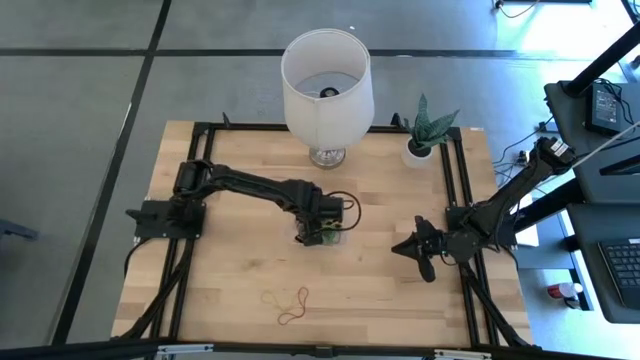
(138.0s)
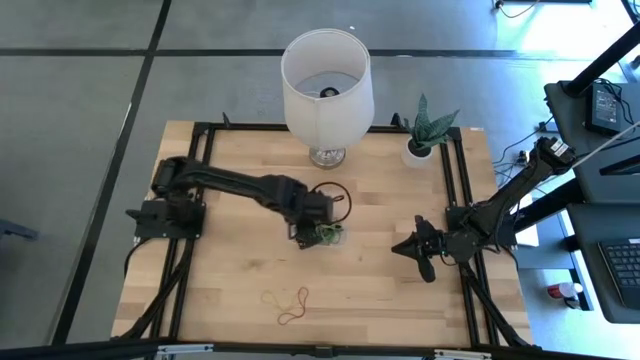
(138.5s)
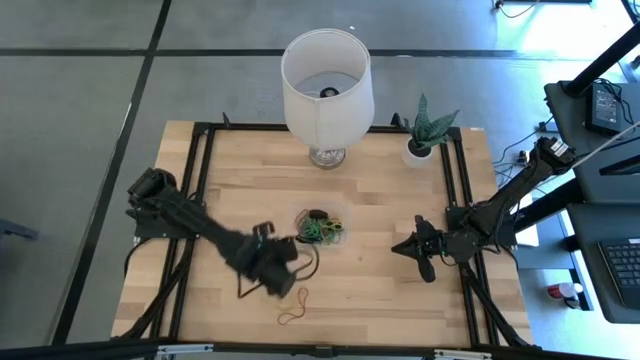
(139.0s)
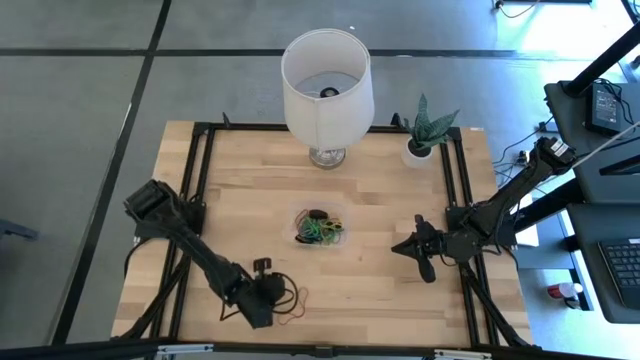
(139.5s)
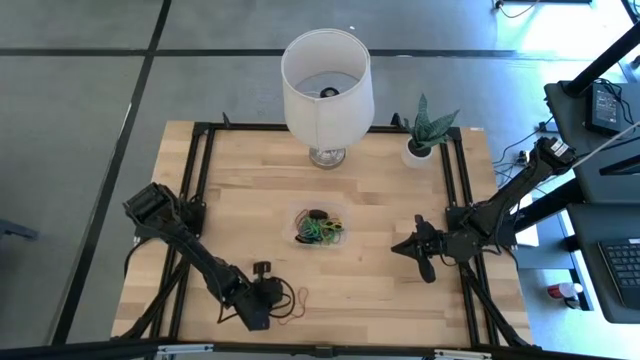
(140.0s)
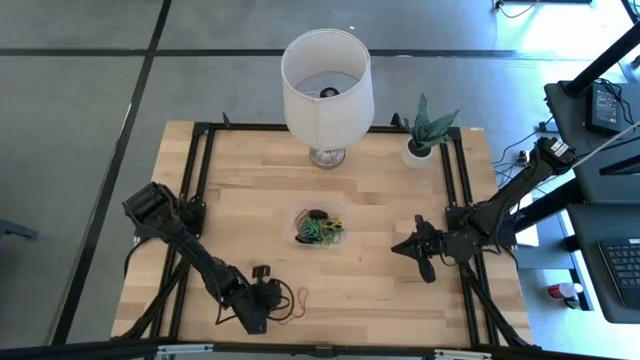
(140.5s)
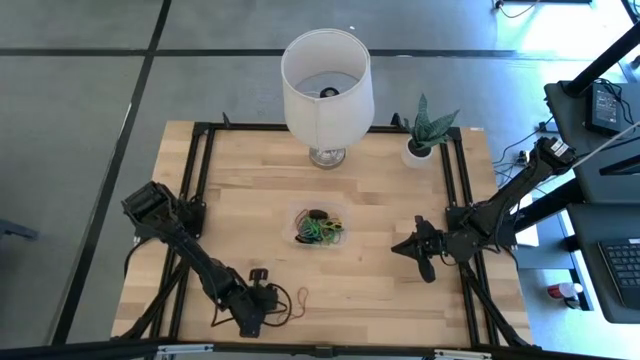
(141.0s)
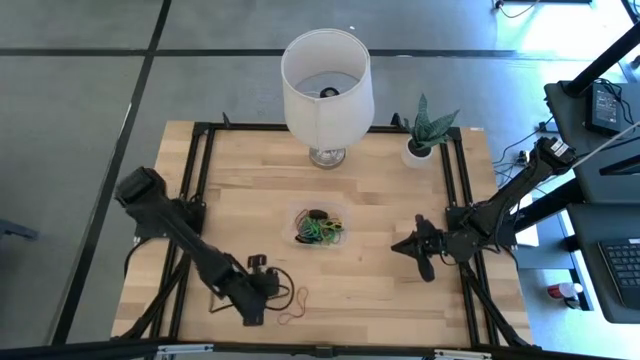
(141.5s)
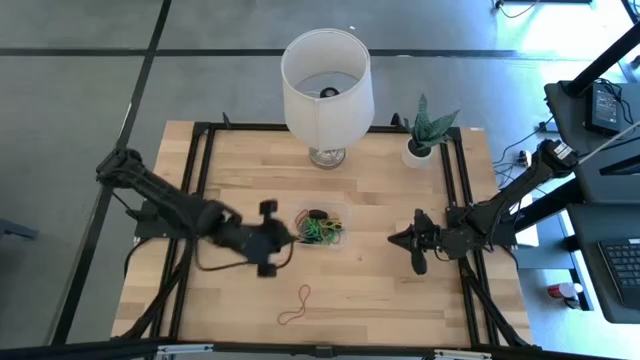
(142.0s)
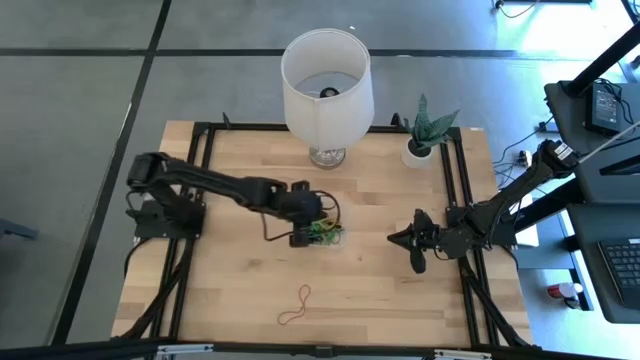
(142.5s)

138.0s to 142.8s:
Task: Pick and place rubber bands into bin
Put the yellow rubber band into the container

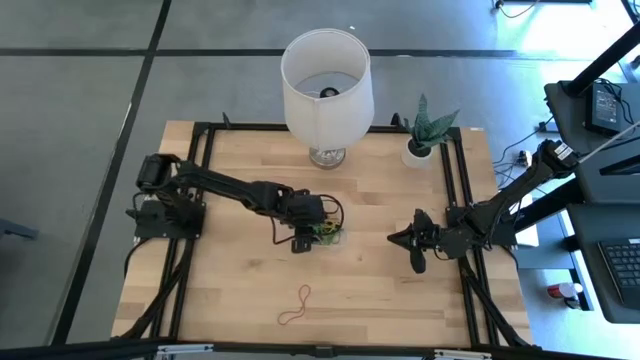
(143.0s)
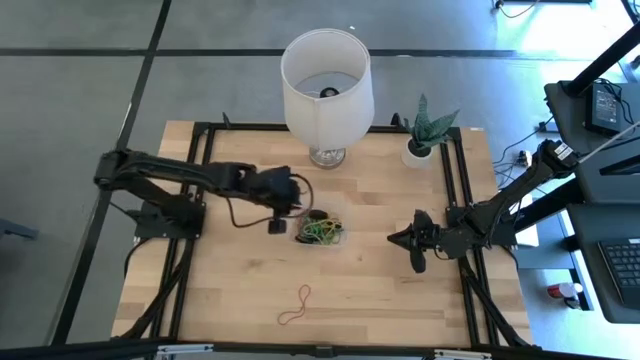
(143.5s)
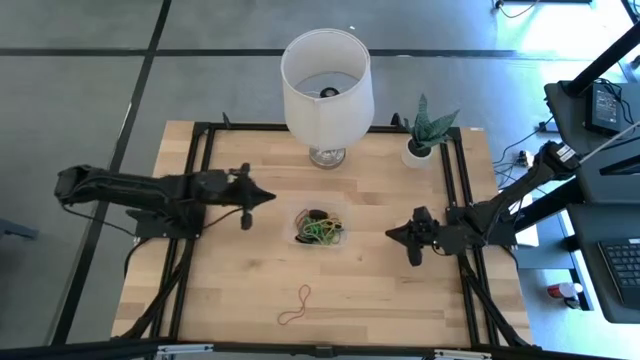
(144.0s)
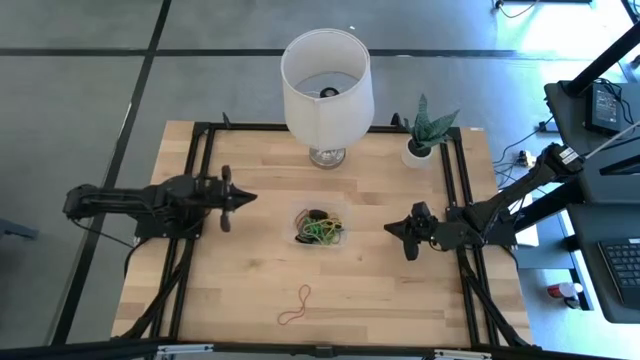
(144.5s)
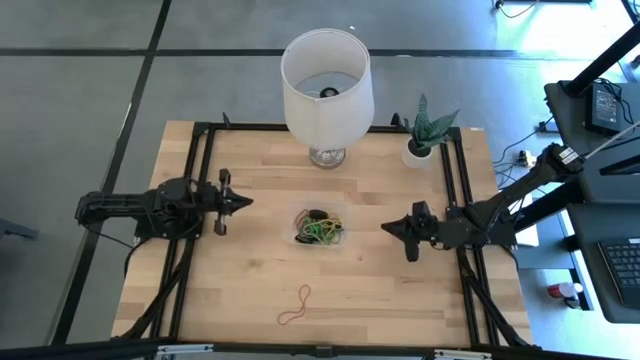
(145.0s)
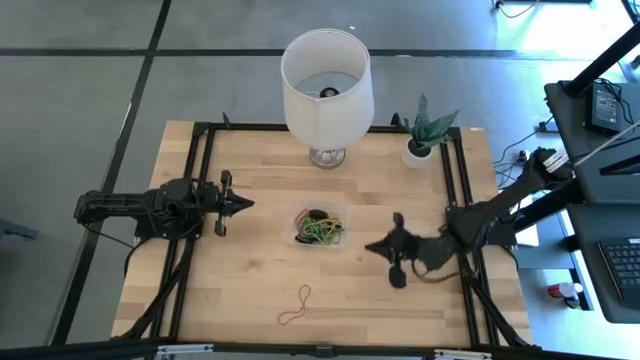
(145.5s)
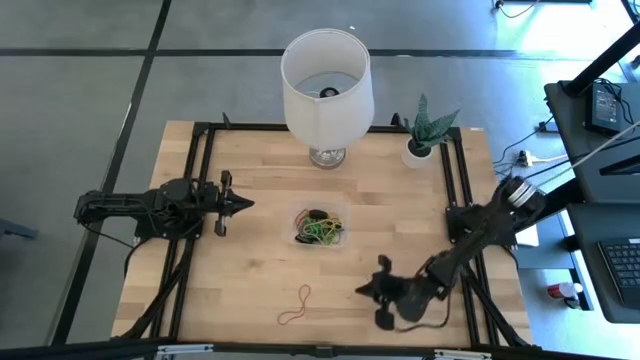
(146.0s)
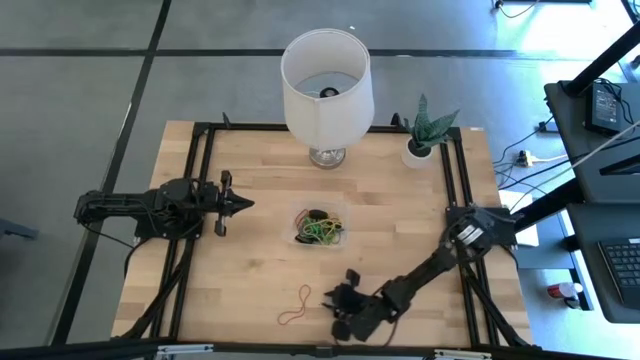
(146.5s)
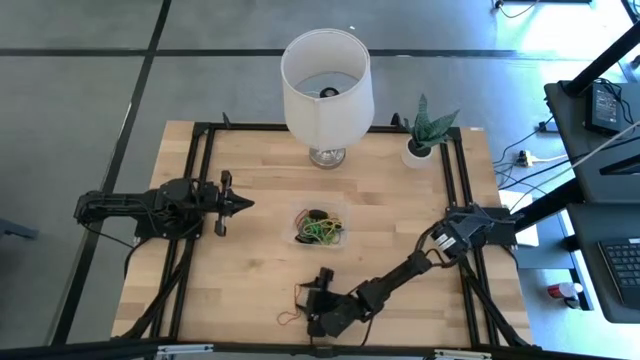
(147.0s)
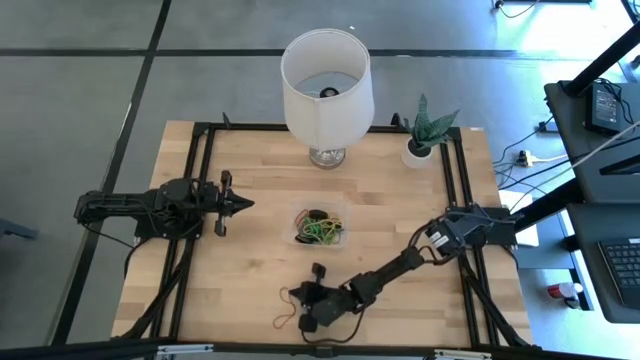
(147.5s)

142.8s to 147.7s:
Put the red rubber band into the container

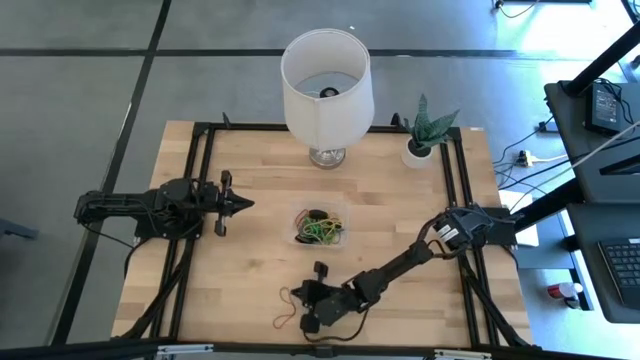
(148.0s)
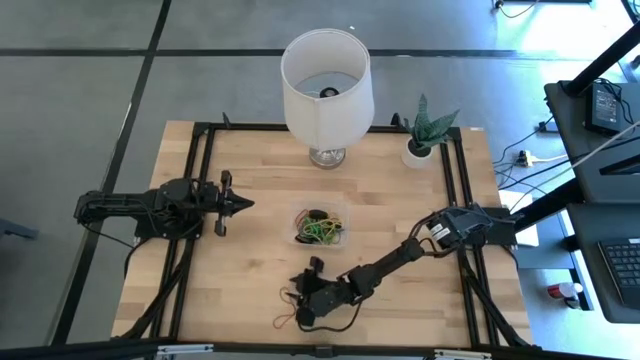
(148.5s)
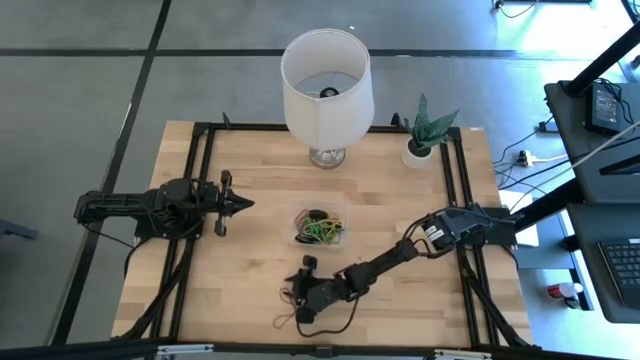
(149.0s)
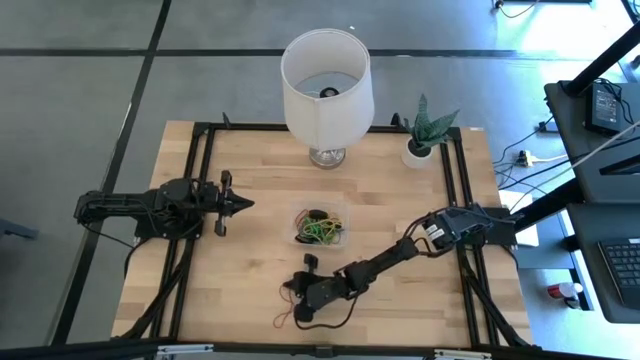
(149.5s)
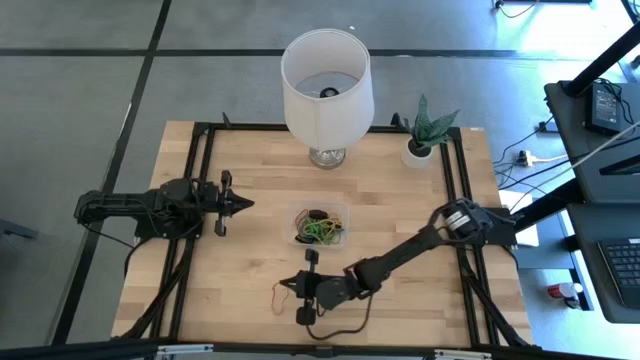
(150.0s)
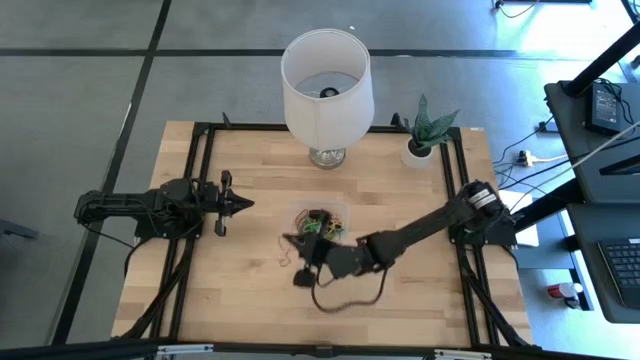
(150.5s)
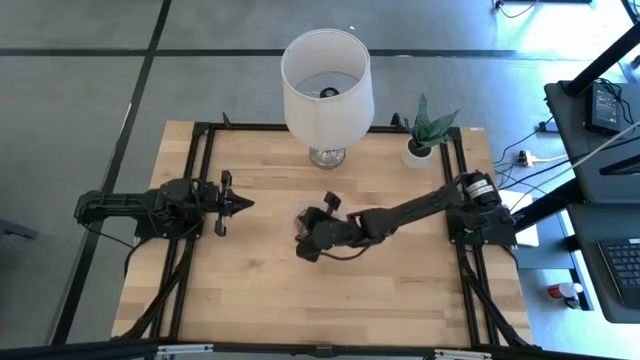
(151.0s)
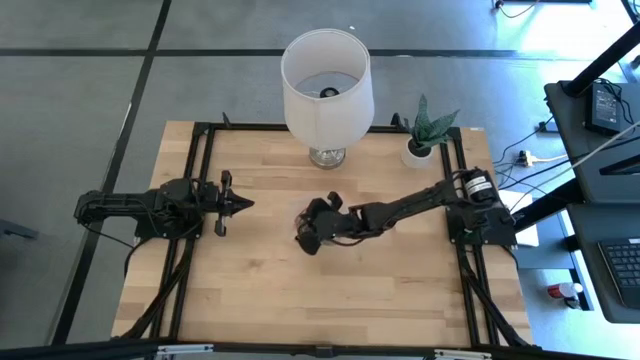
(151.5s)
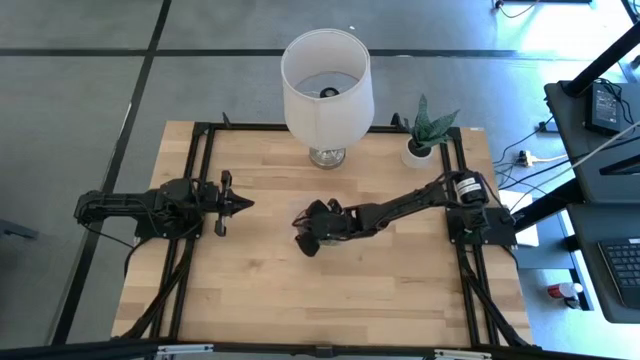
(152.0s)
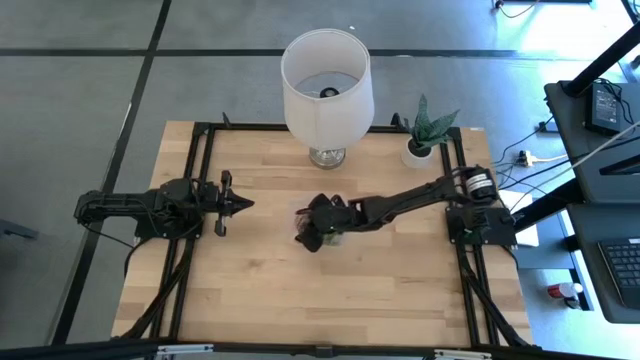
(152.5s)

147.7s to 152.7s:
Put the red rubber band into the container

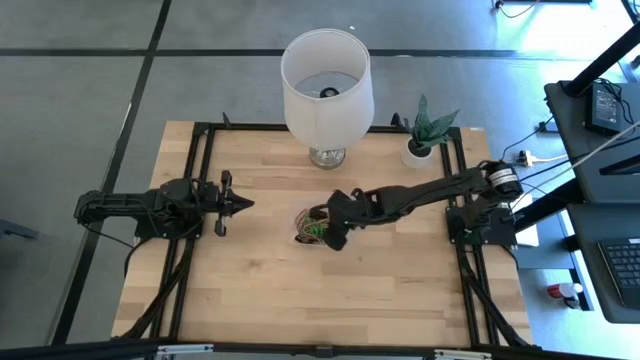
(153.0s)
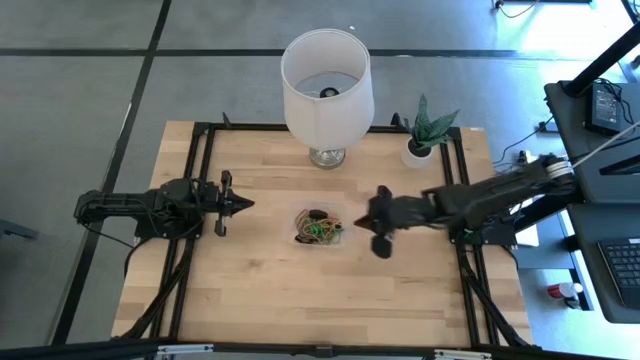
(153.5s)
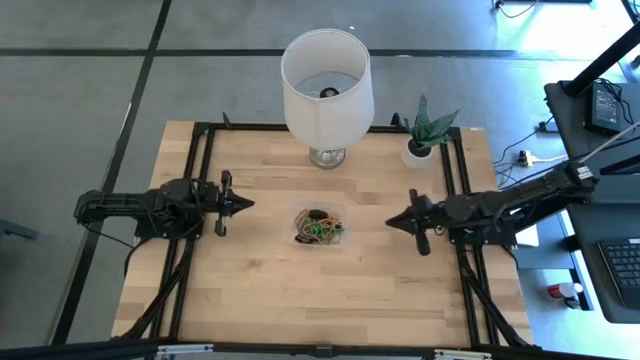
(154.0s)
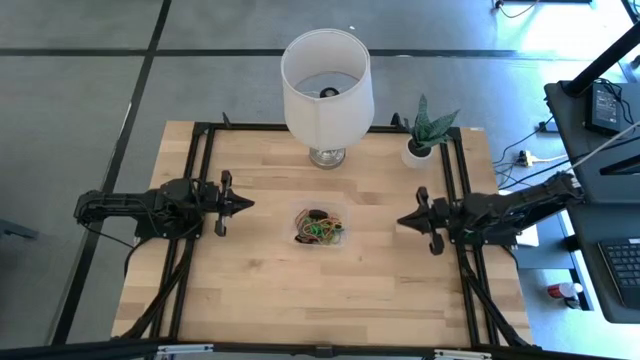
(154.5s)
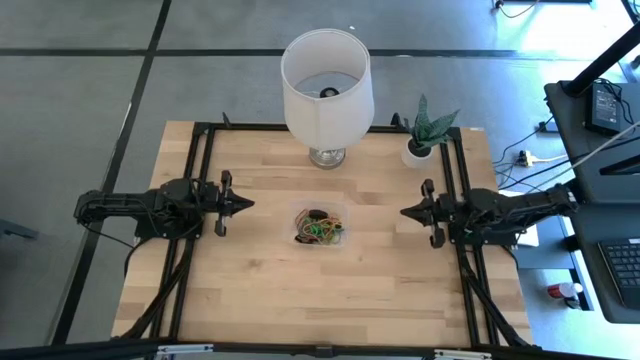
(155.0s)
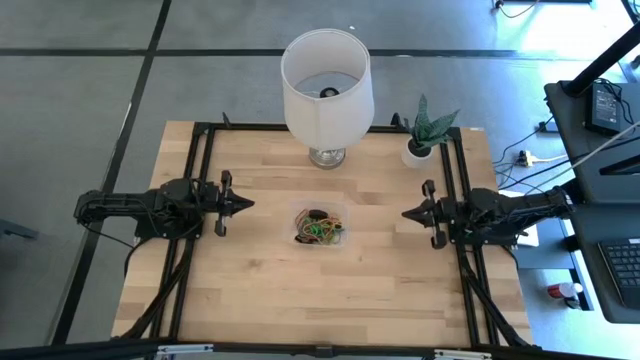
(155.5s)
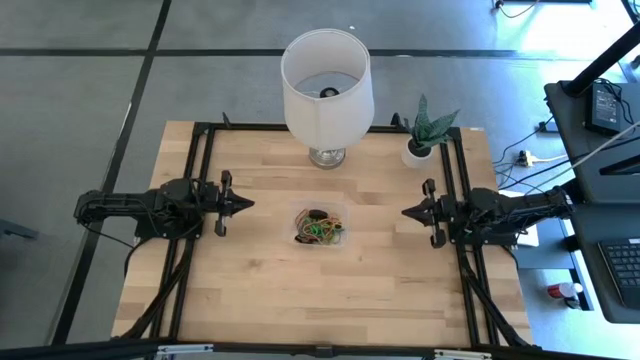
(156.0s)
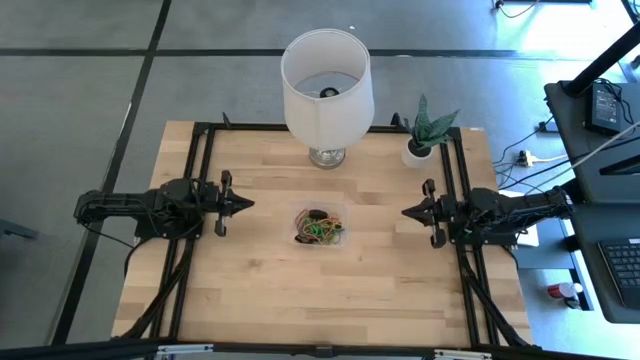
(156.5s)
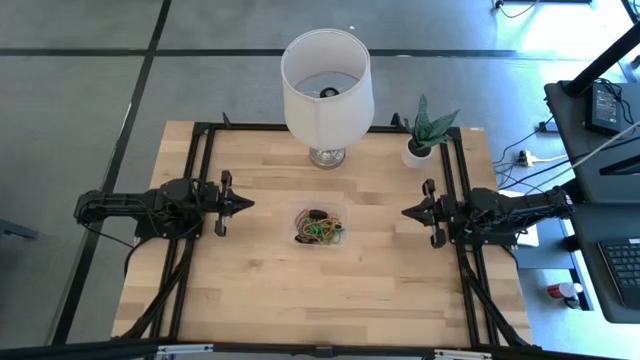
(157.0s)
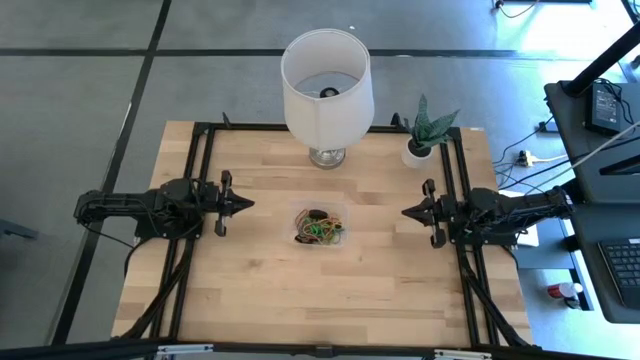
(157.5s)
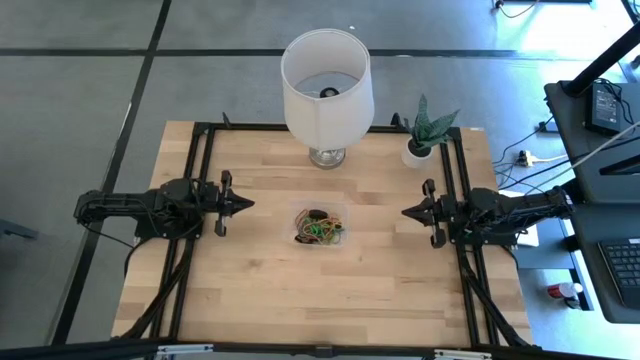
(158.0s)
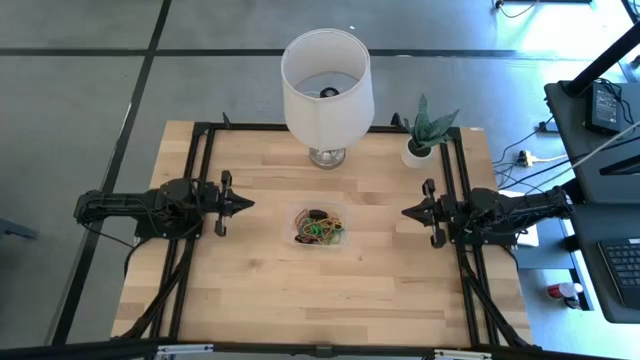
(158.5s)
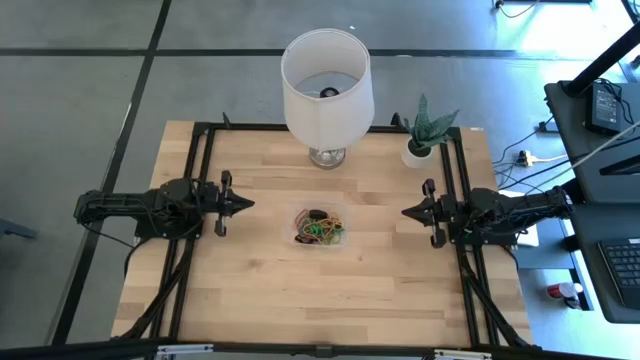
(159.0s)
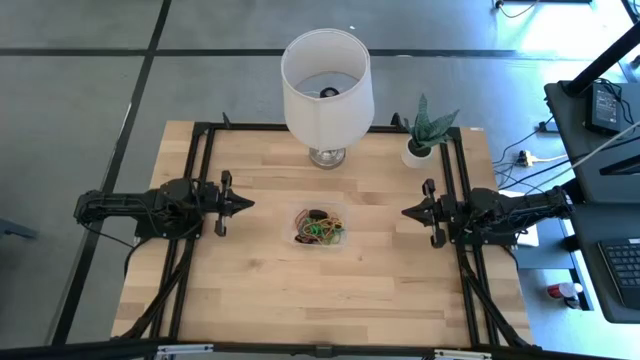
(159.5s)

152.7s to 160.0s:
Return to Home Position
